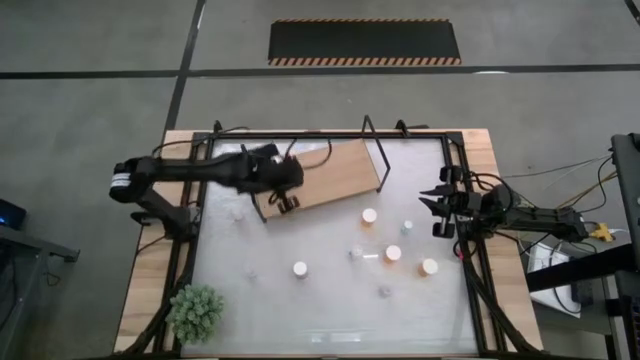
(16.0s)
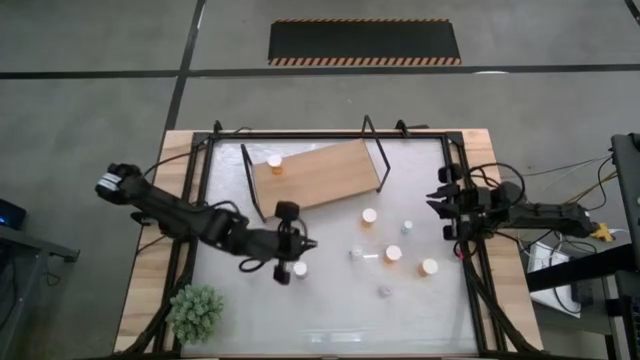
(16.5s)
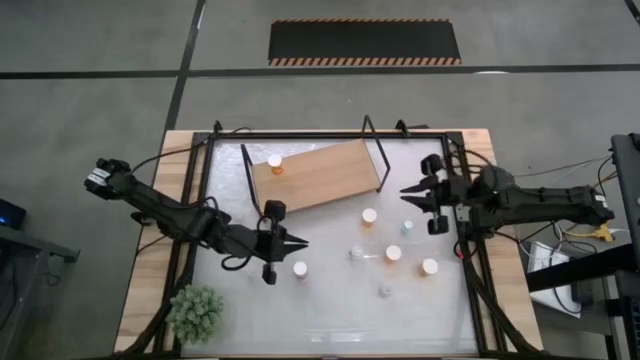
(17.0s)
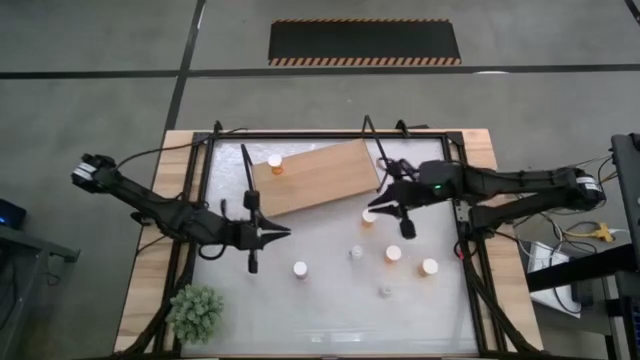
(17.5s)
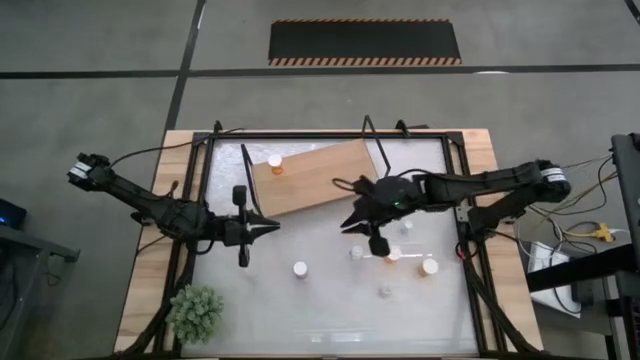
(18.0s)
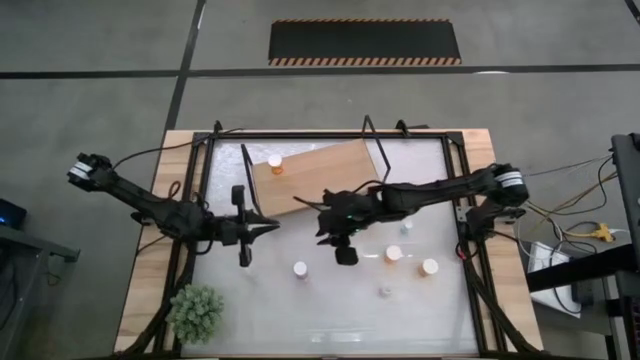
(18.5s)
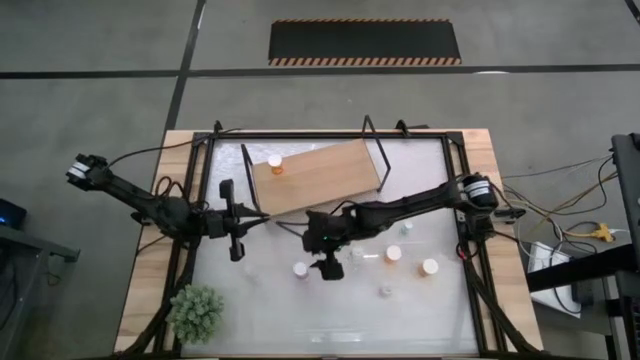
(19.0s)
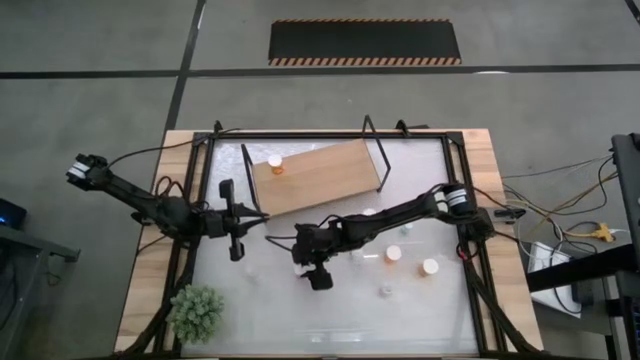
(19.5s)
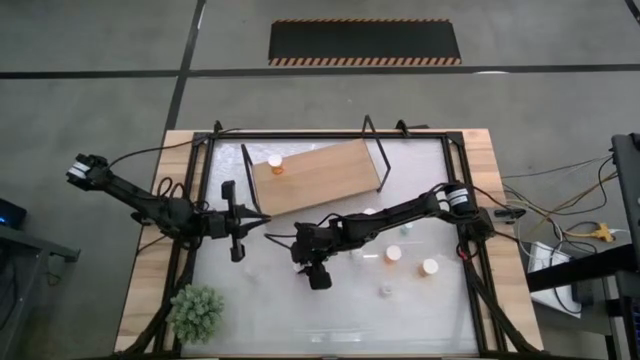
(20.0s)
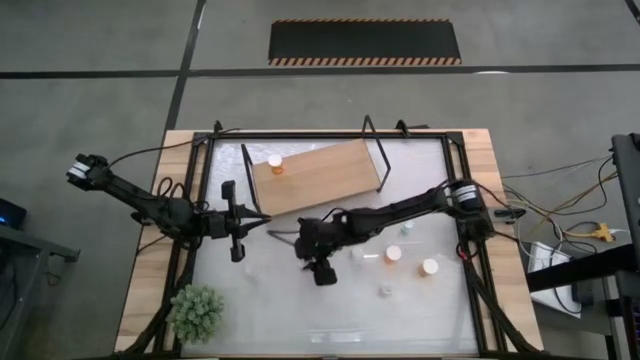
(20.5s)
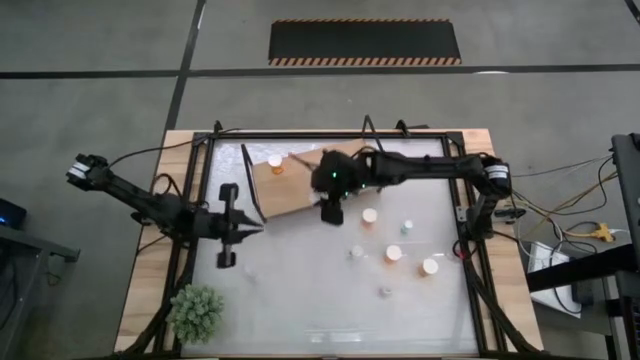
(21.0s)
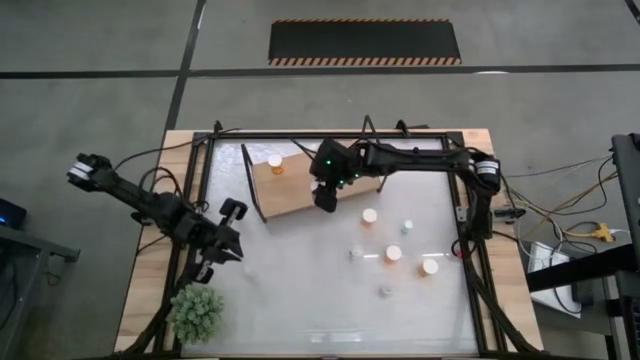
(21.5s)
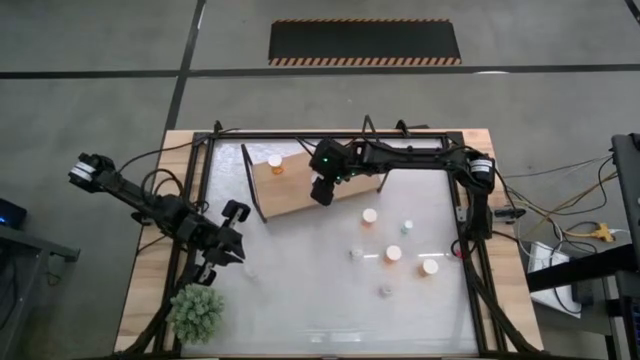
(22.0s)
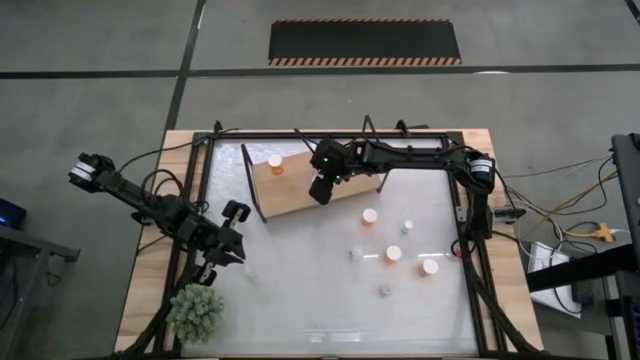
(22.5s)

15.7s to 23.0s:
Task: Pick and place medicine bottles onto shelf by color
Put the big pink pill bottle on the shelf

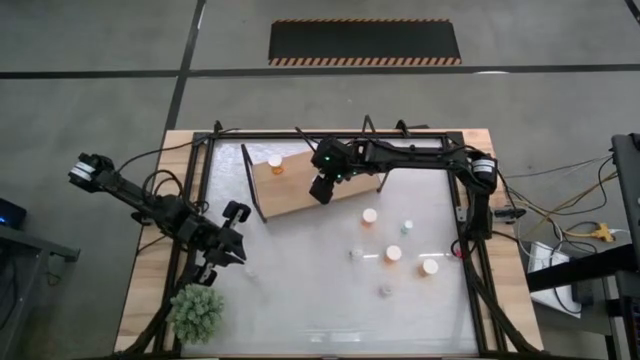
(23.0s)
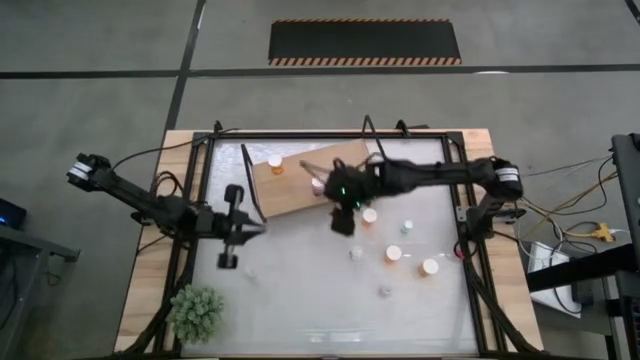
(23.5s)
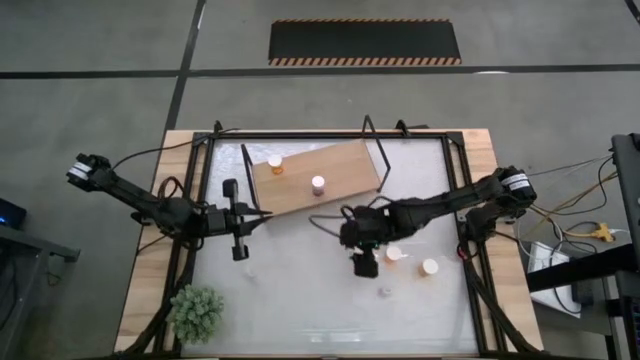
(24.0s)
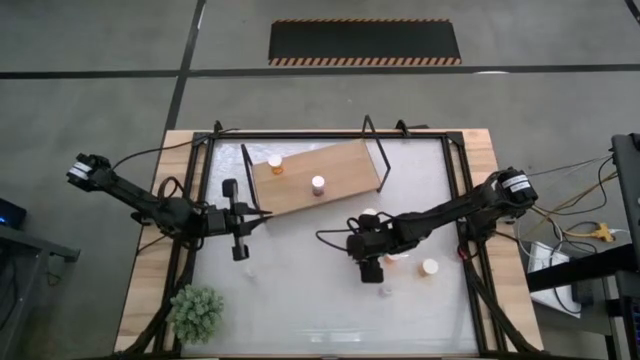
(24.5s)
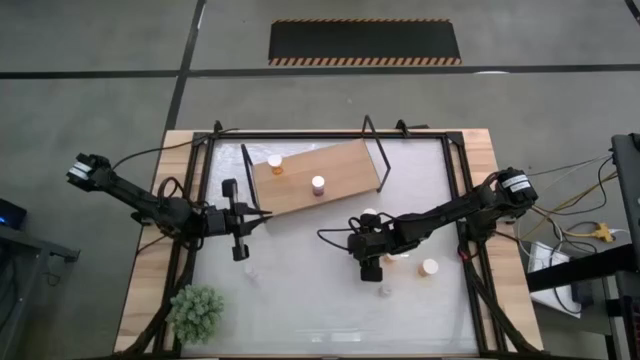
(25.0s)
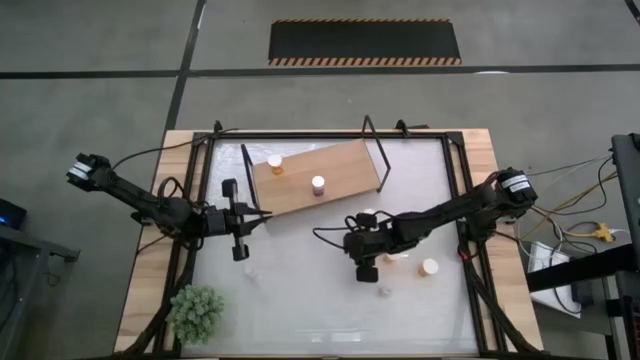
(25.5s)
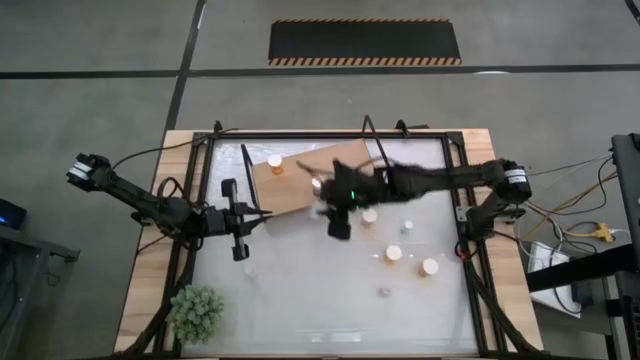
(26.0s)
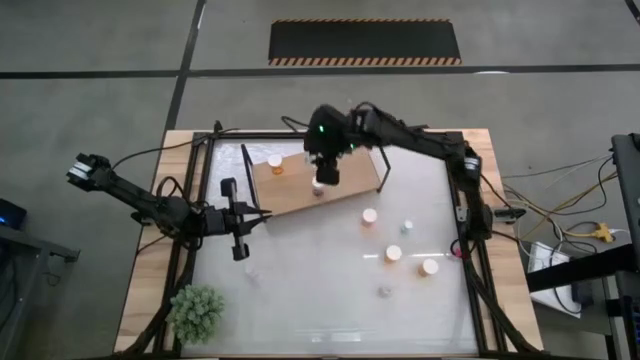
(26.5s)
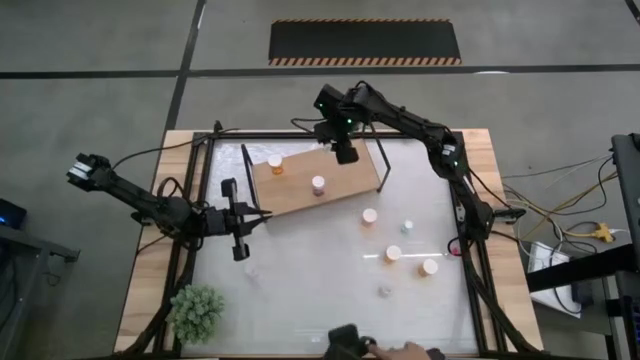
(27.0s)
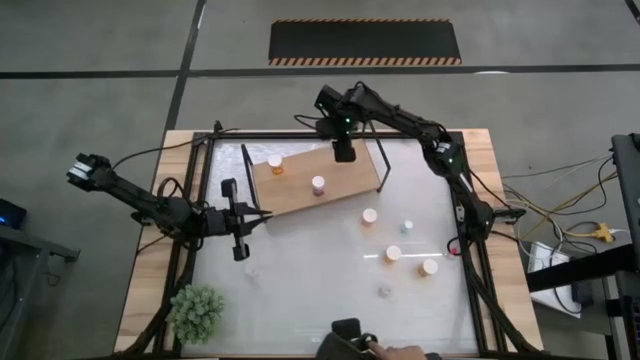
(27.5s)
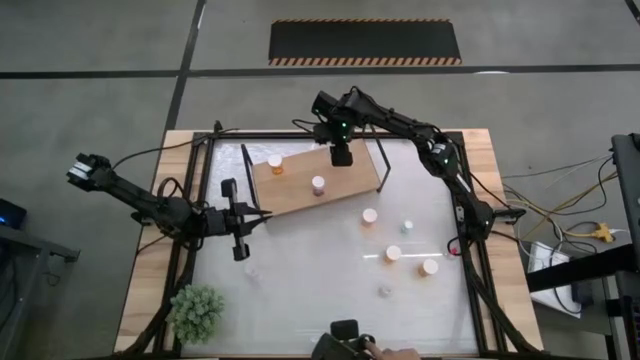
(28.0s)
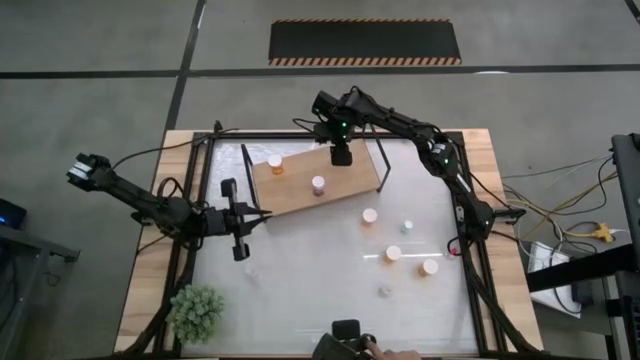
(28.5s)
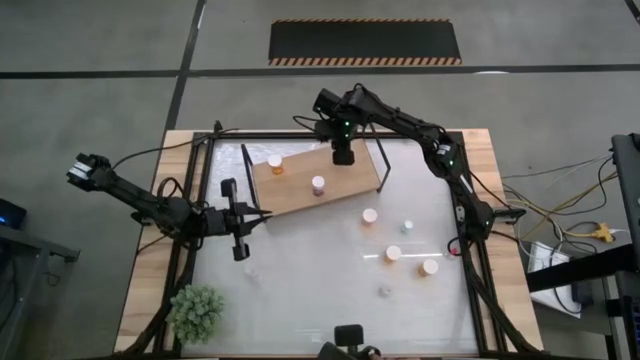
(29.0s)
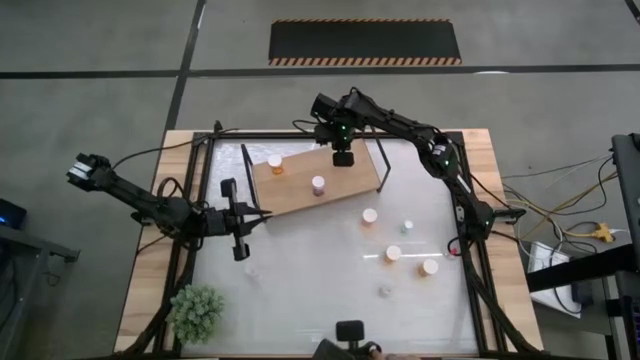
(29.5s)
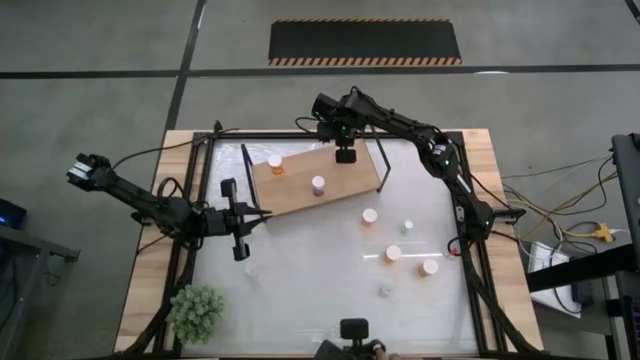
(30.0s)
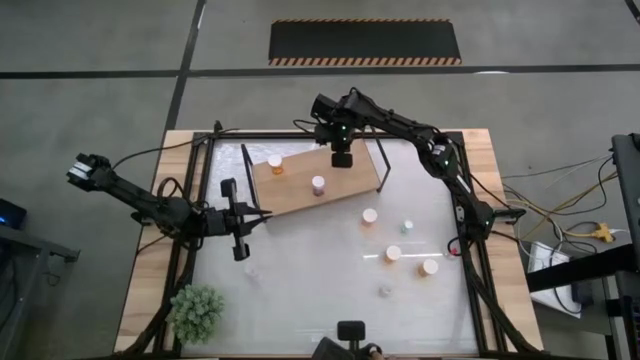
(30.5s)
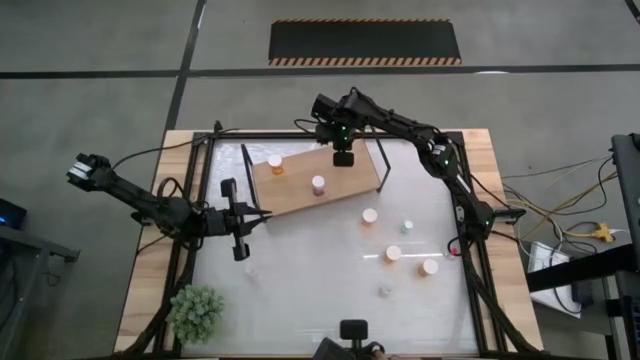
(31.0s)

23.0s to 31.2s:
Put the left blue pill bottle on the shelf

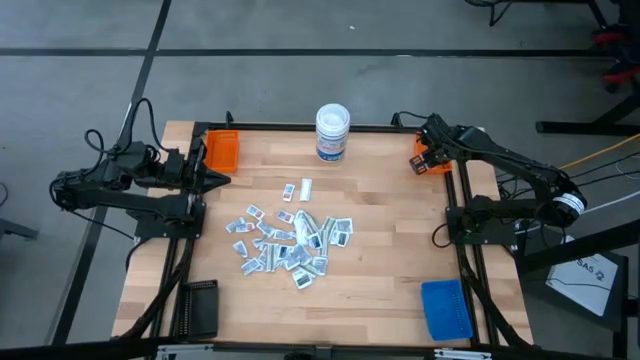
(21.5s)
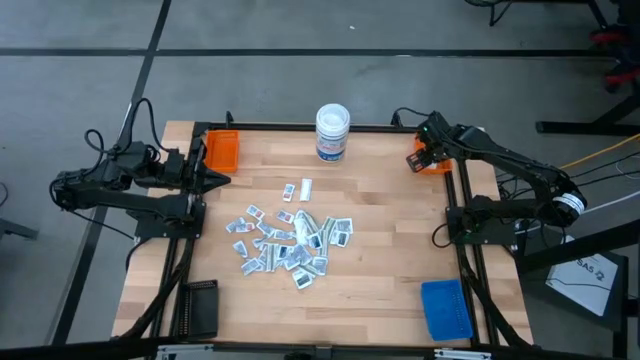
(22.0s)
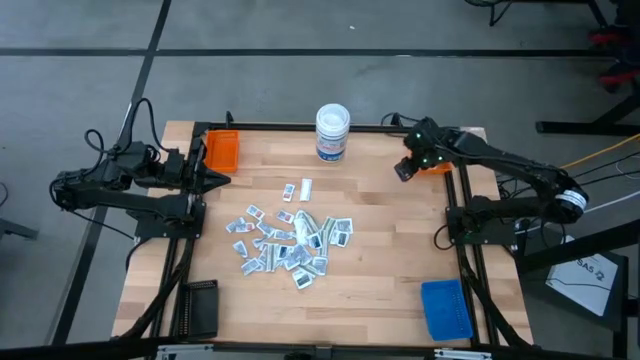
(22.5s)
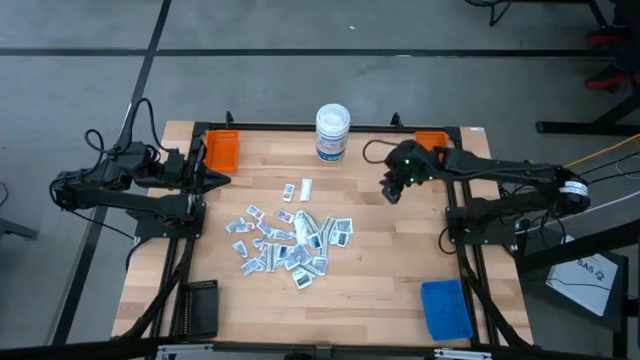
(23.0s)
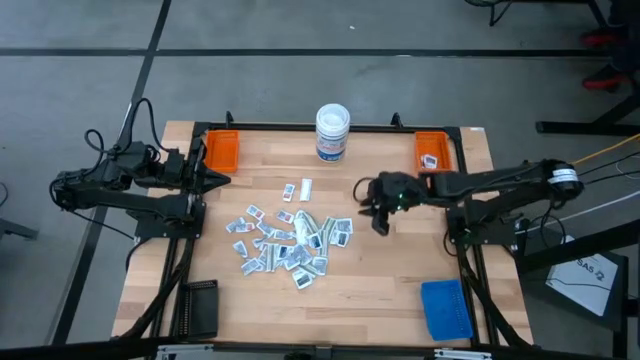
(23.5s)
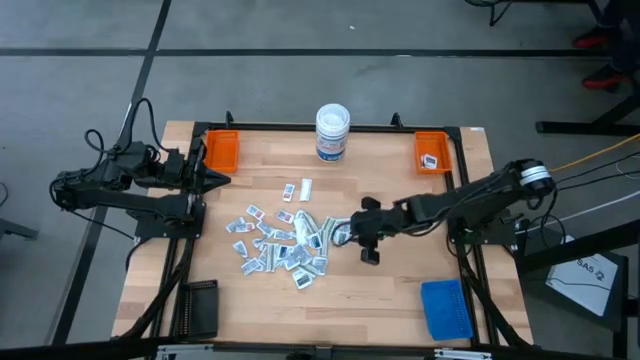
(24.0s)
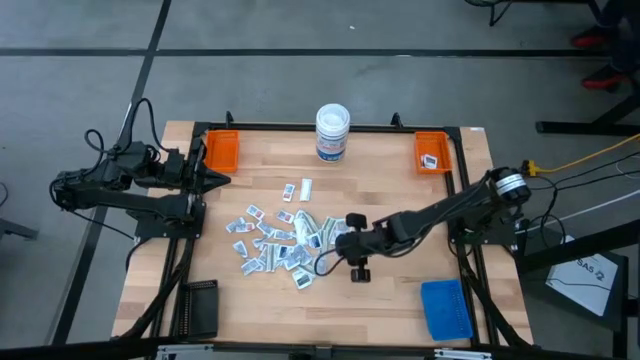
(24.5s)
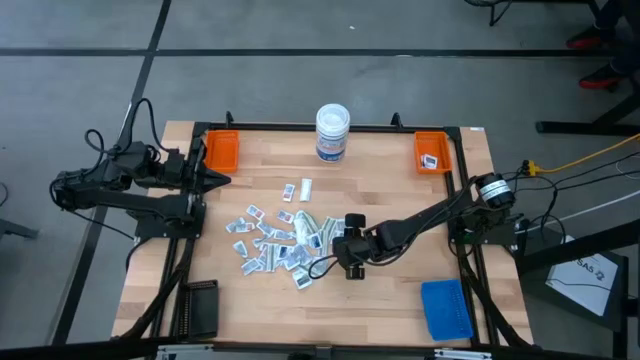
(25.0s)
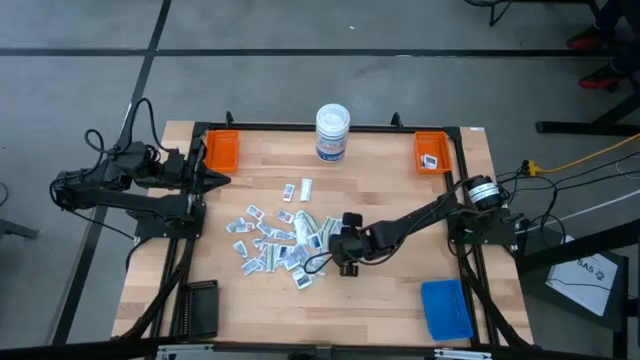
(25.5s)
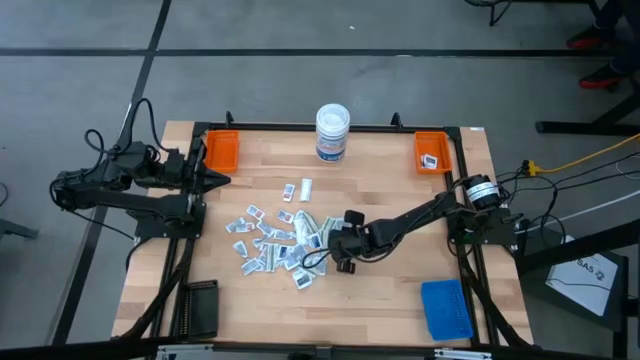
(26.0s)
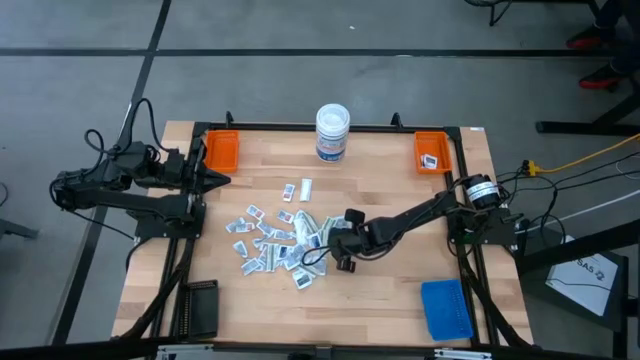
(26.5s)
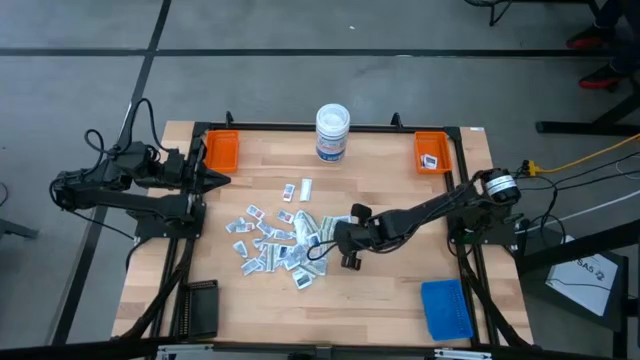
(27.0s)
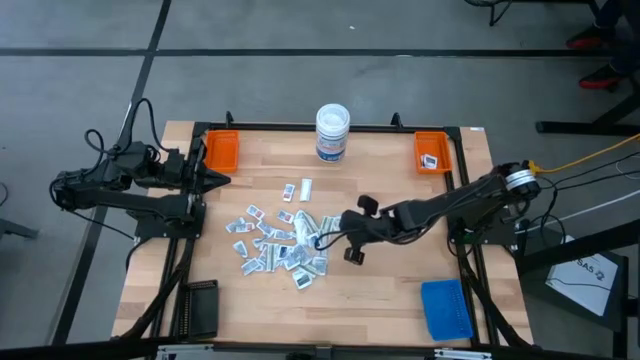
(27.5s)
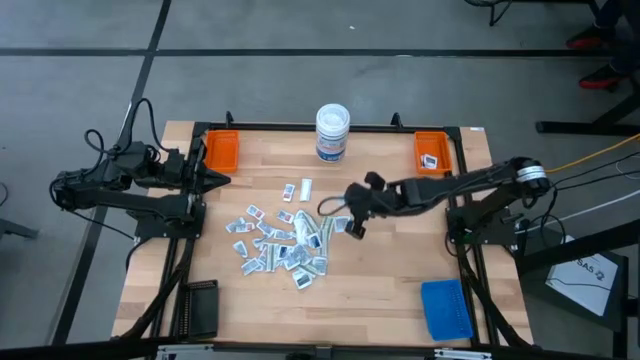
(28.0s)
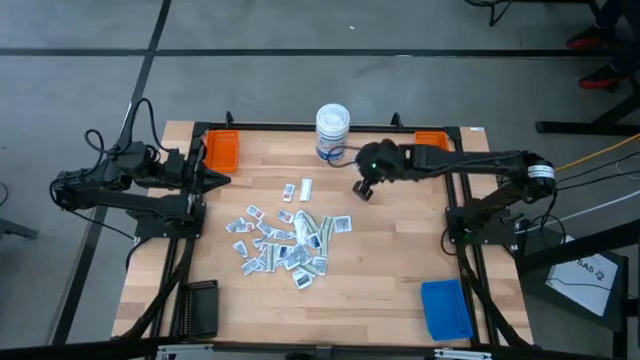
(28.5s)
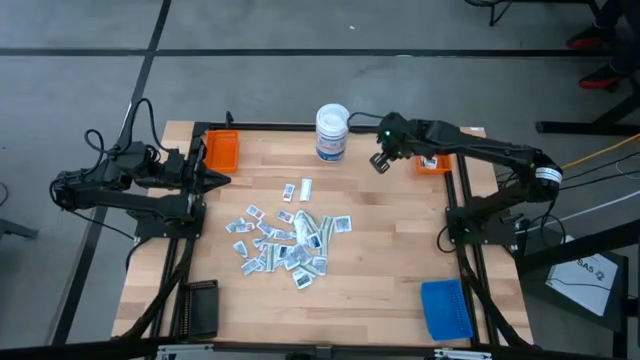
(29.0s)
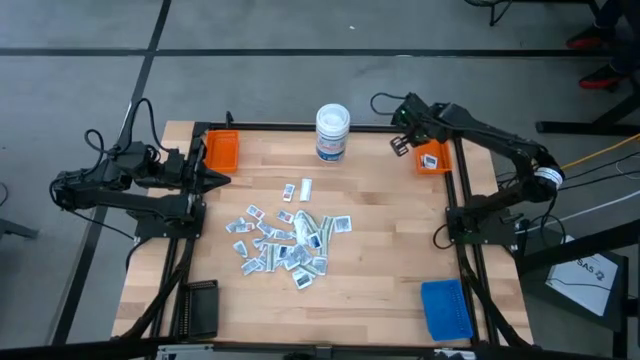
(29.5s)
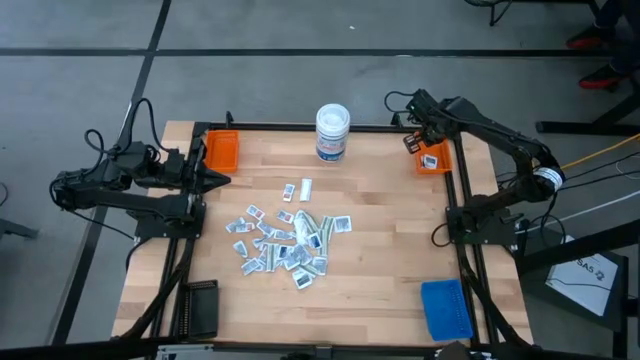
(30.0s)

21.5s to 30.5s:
Task: Pick & Place First Aid Supplies
Put the gray towelette pack into the right orange bin
